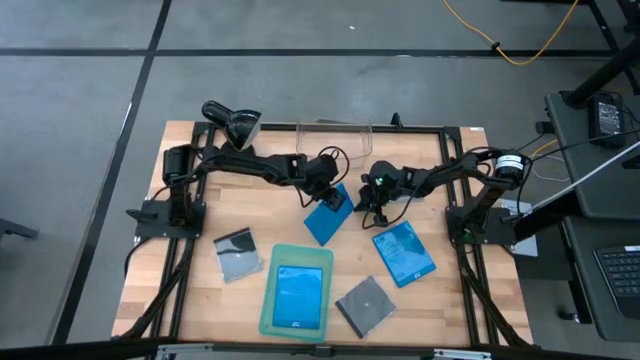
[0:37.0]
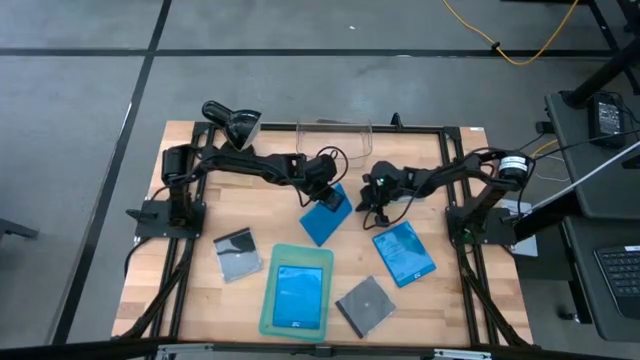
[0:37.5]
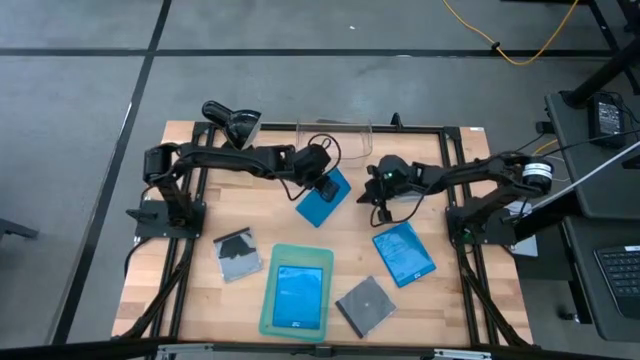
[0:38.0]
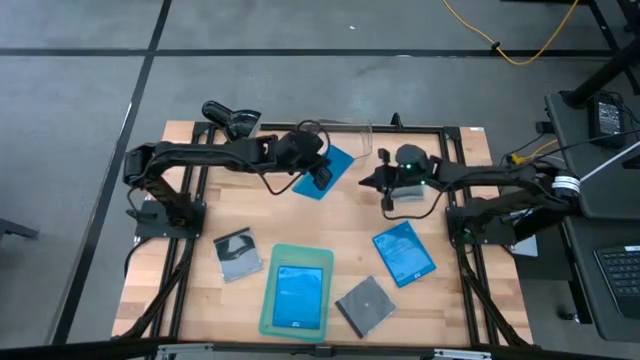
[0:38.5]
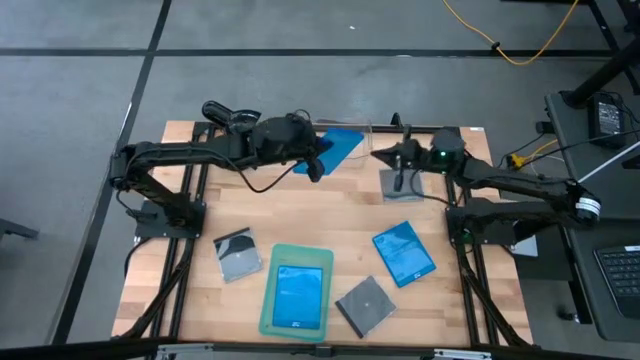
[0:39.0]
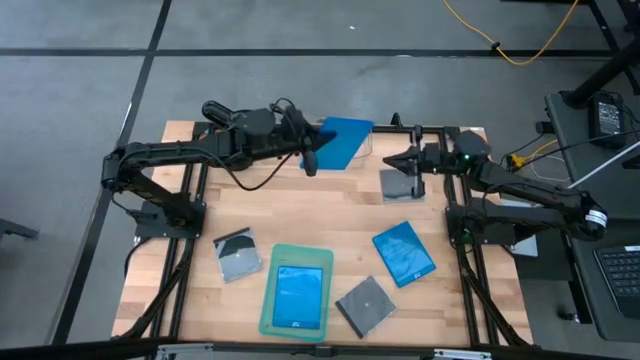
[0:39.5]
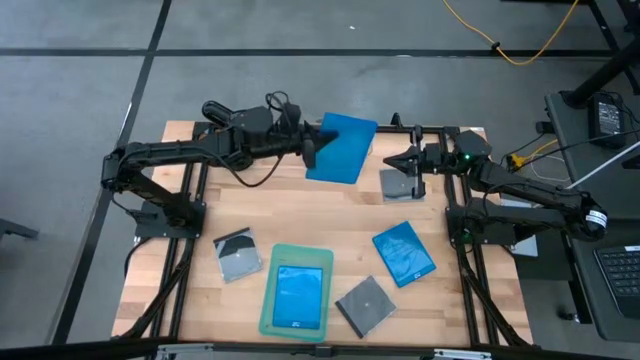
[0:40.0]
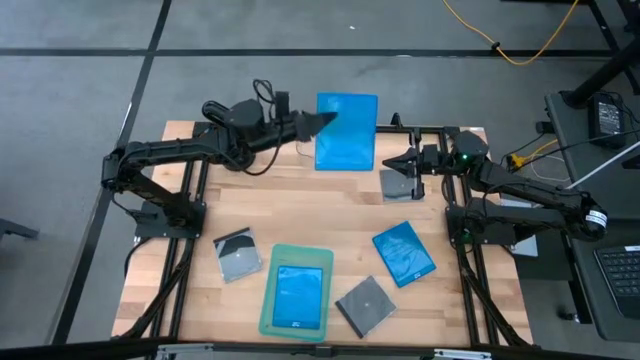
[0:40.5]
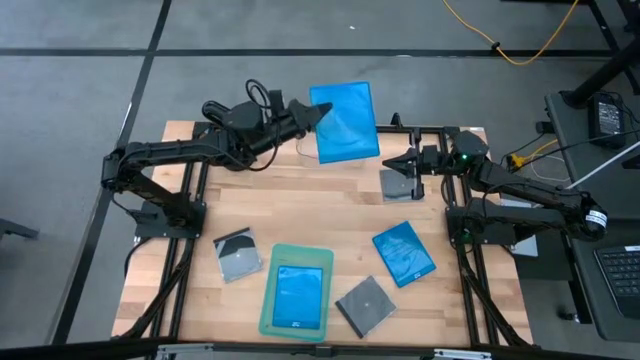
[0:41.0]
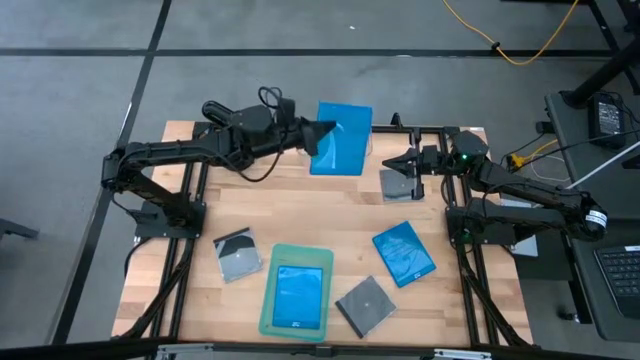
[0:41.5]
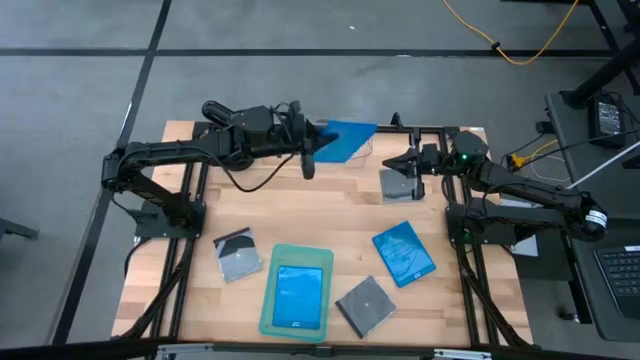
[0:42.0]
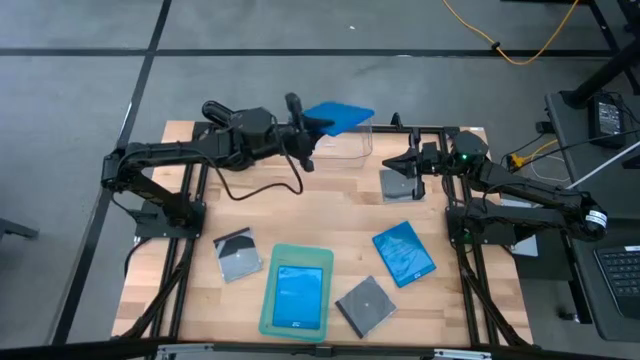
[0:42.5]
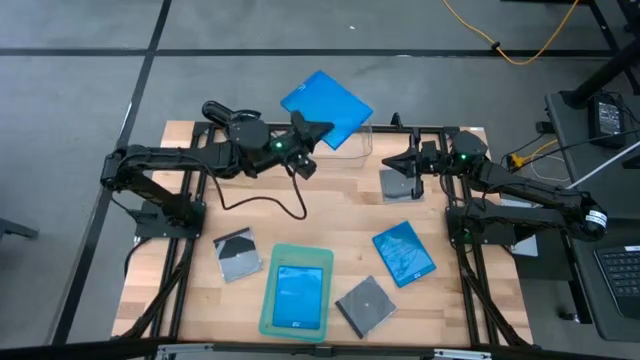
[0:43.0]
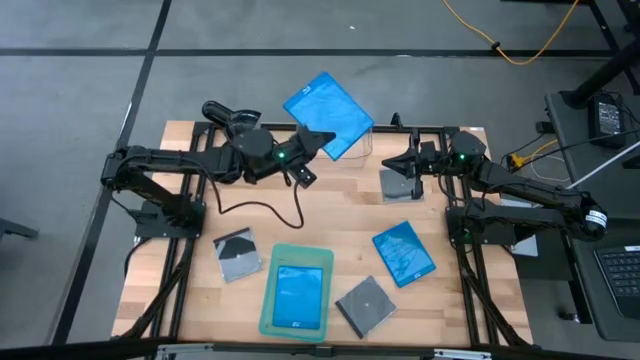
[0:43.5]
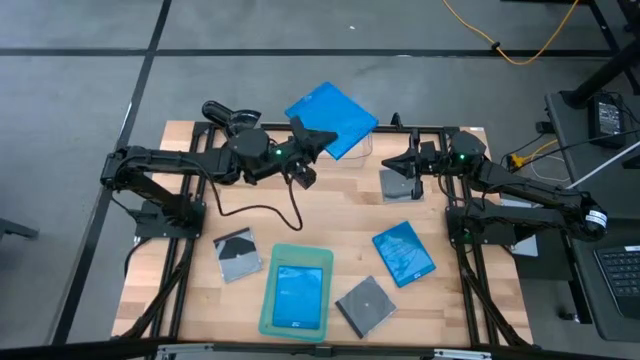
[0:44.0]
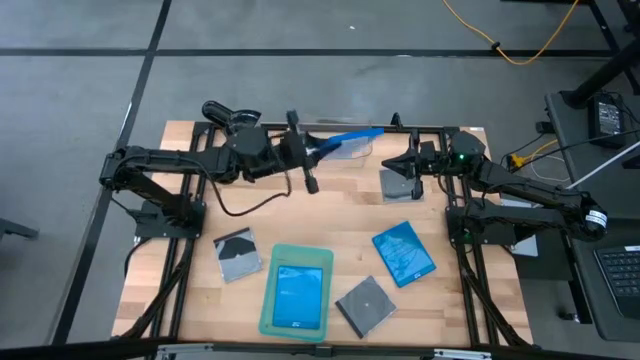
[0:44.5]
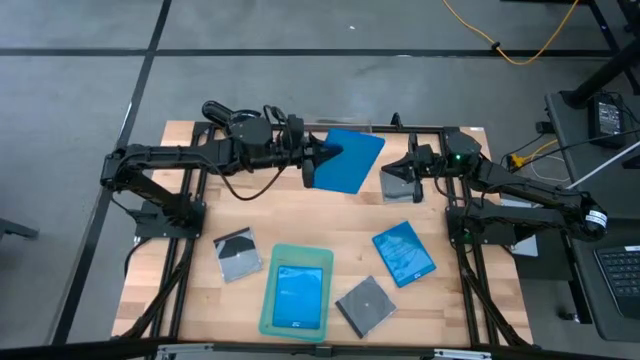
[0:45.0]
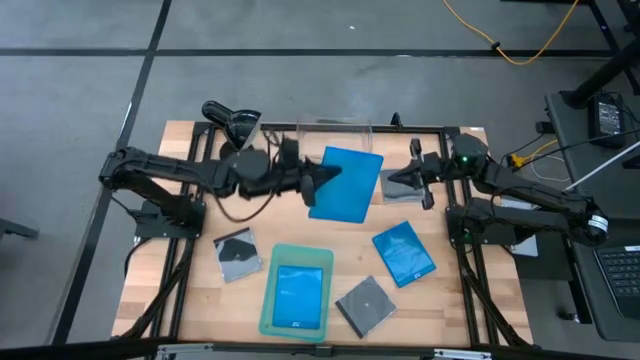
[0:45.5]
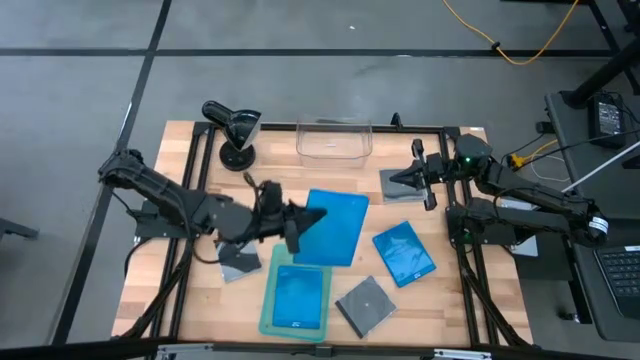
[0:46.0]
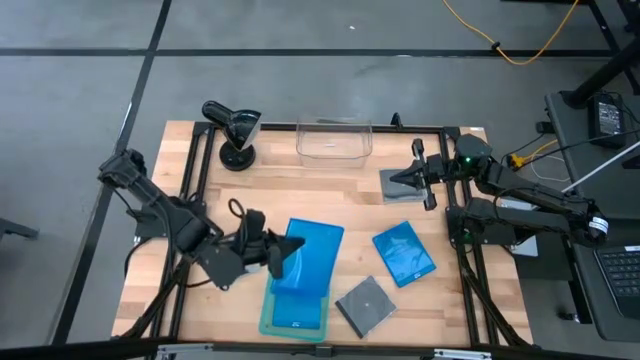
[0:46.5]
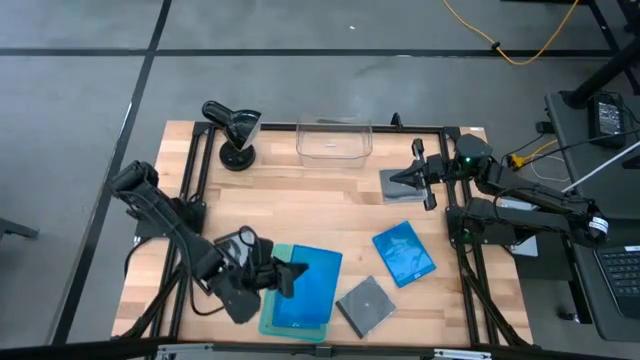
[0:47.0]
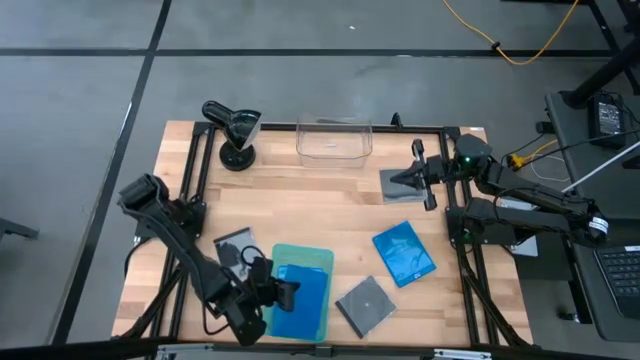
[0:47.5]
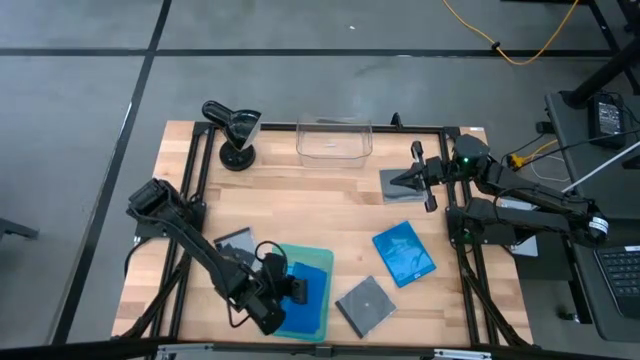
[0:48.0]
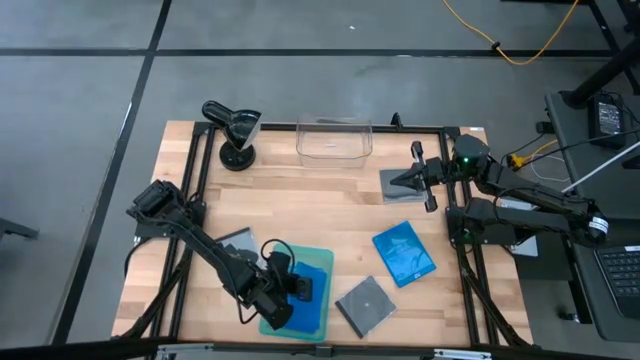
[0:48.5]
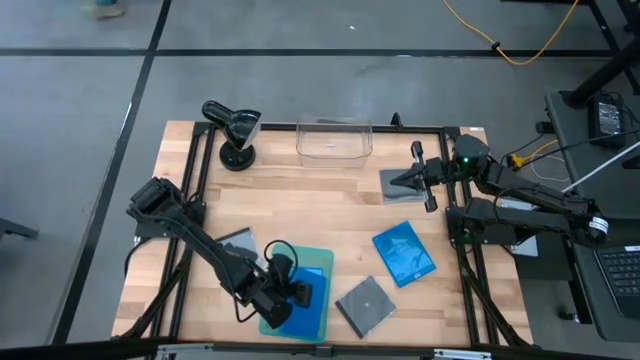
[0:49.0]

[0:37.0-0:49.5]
Task: Pick & place jewel cases by type
Put the left blue cd case into the green bin

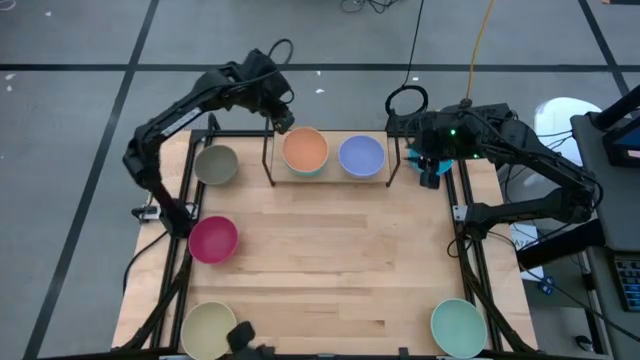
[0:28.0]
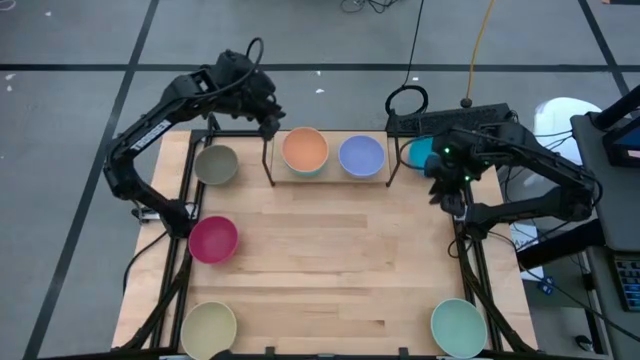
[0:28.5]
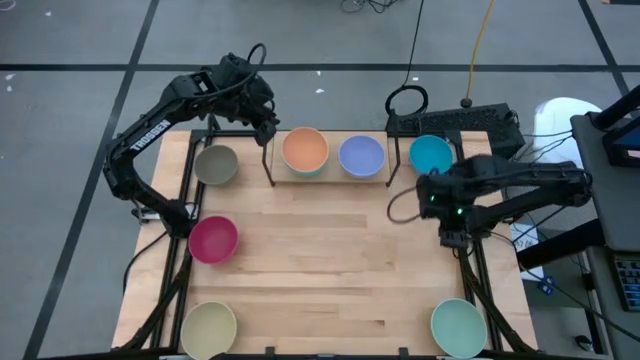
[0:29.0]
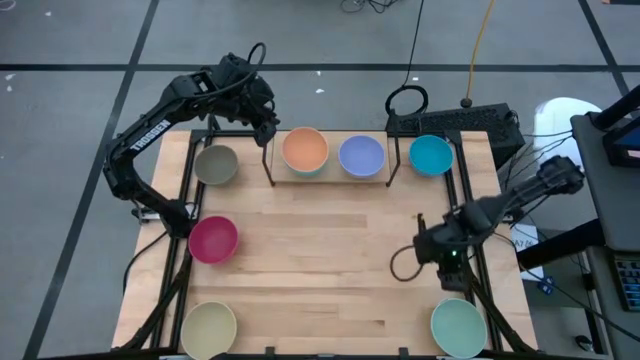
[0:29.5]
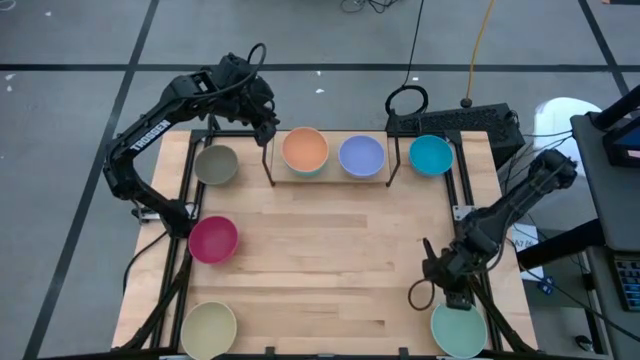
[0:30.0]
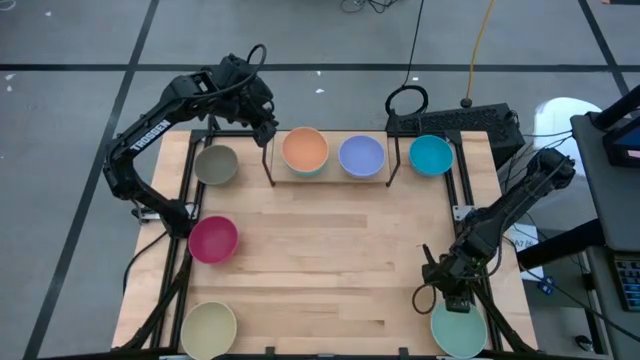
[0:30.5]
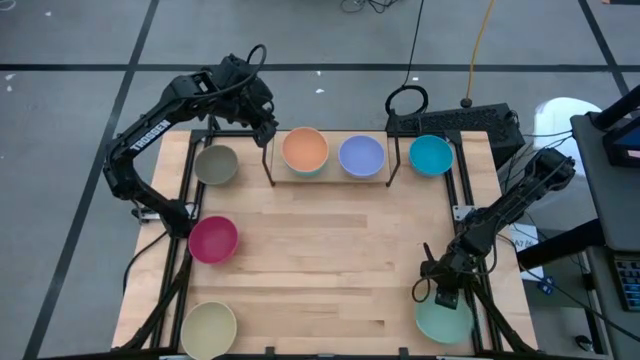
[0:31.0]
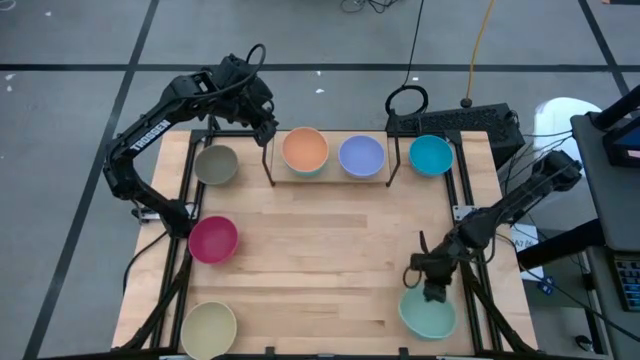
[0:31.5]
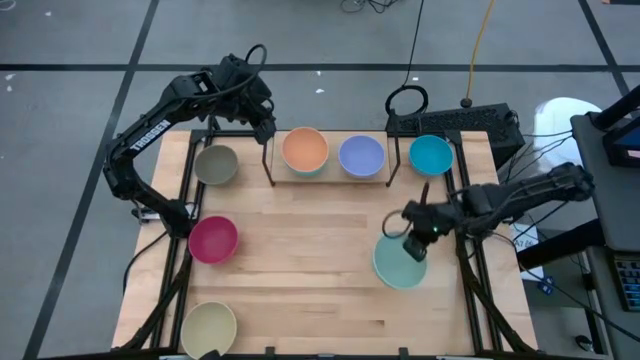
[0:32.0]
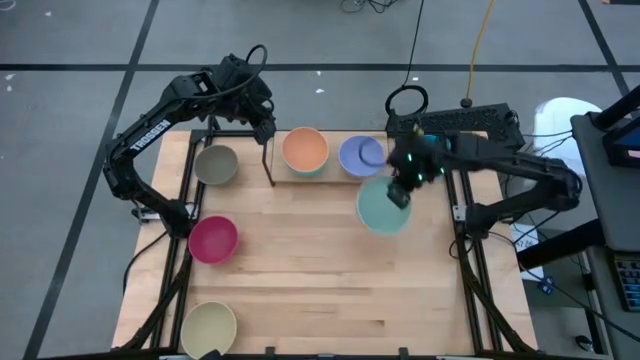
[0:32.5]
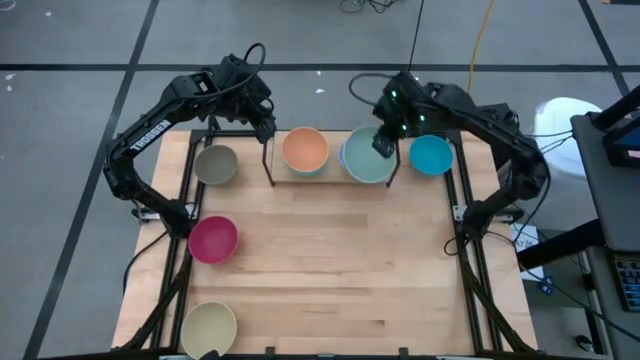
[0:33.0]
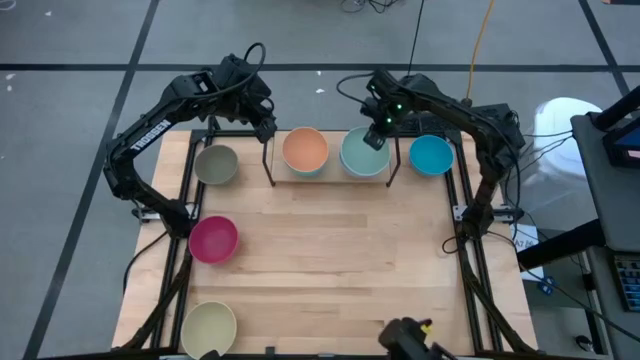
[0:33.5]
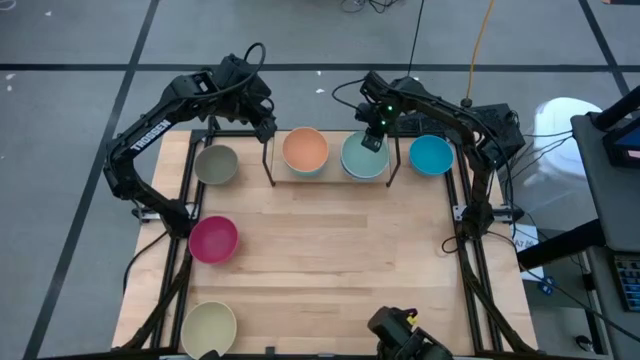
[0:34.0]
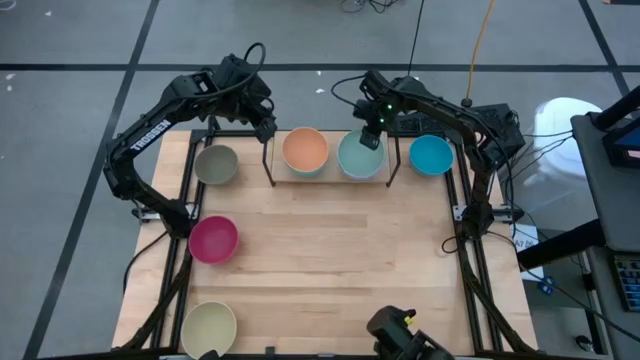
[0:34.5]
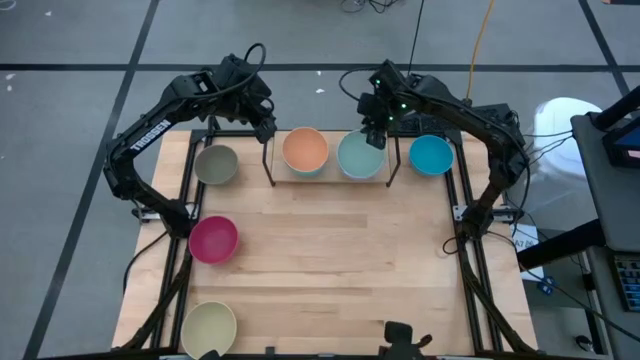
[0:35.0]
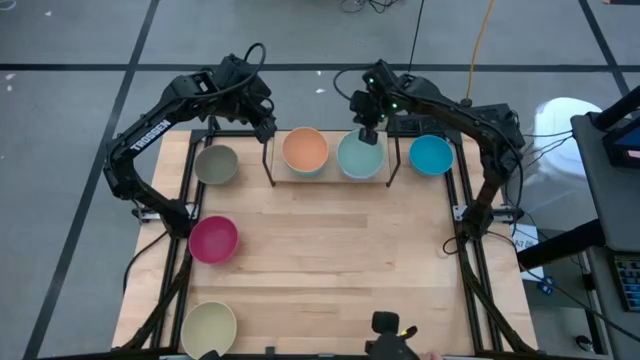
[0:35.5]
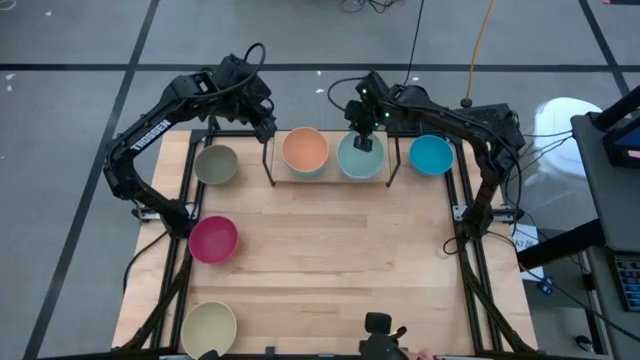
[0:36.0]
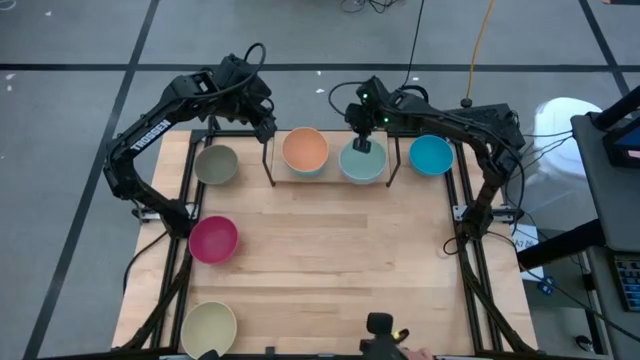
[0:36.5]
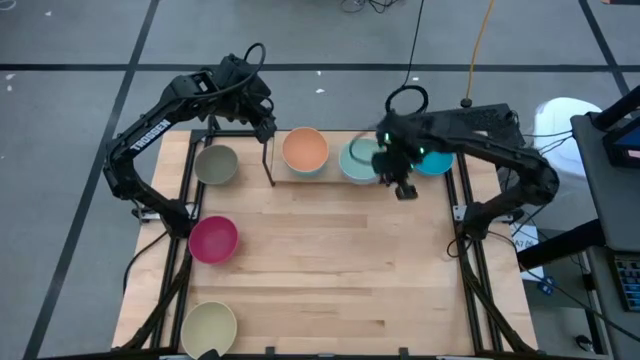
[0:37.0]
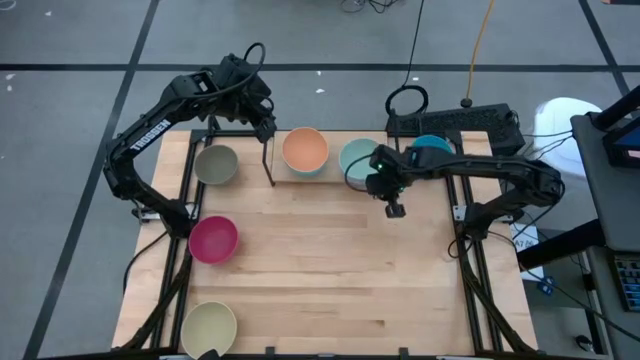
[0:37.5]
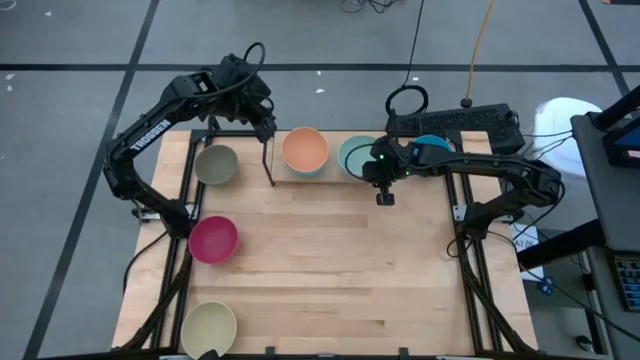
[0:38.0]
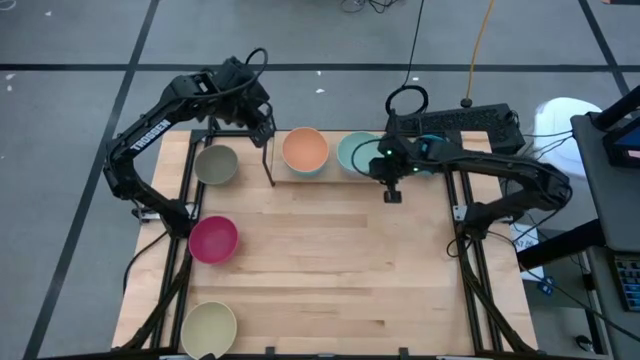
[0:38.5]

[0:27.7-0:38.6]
Task: Place and stack bowls onto a shelf
Stack the green bowl on top of the purple bowl on the shelf
